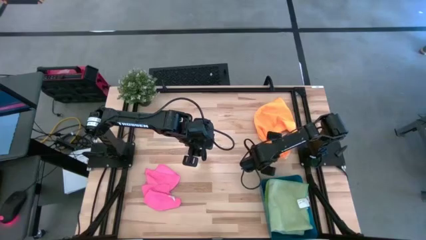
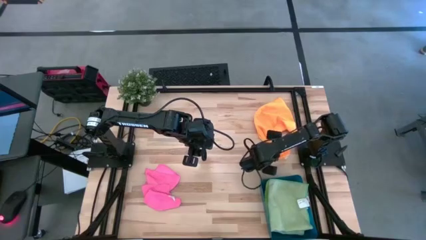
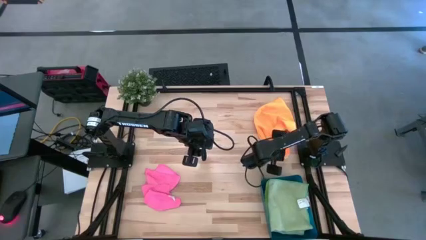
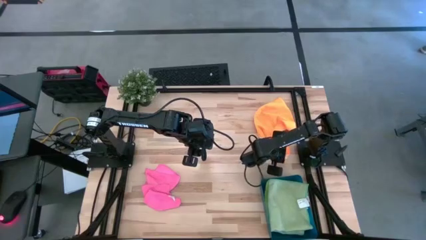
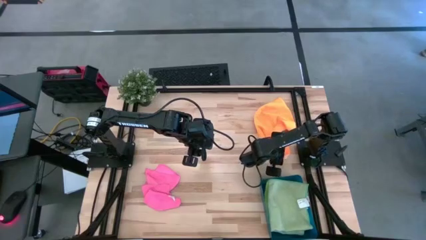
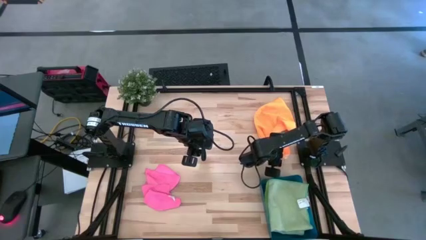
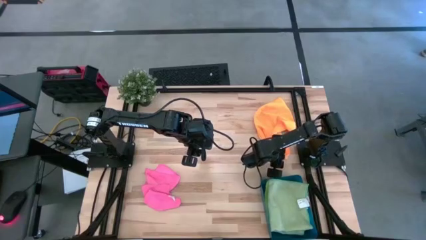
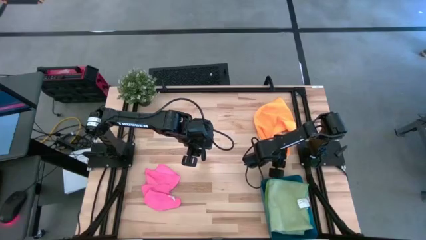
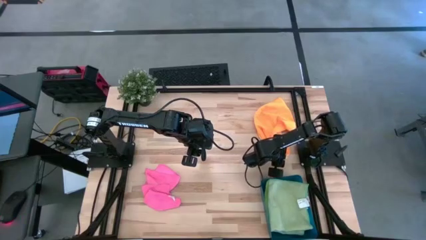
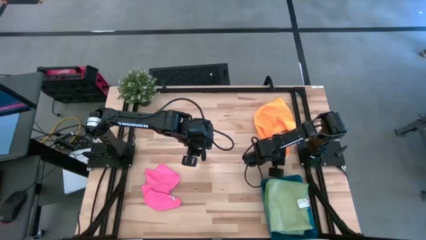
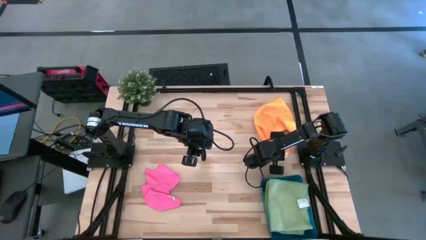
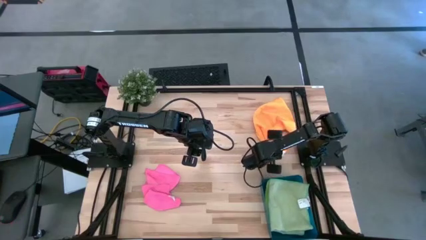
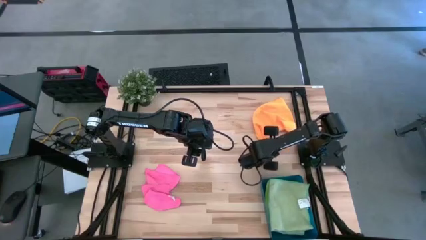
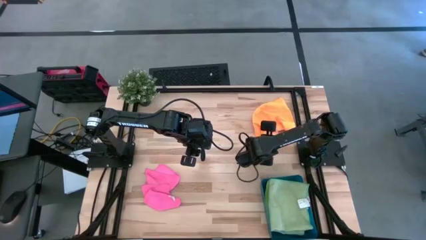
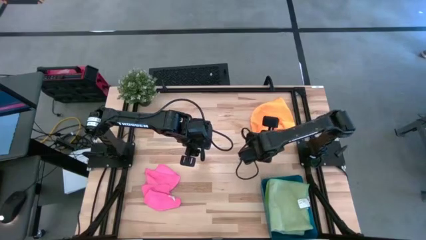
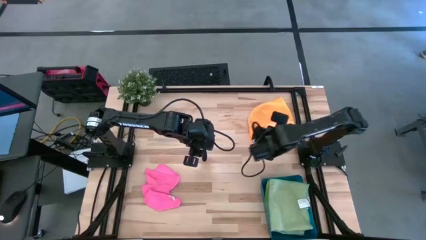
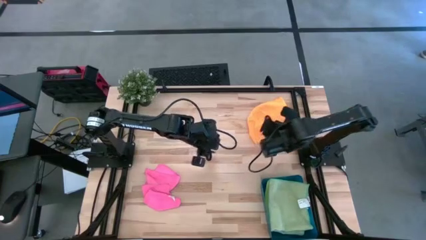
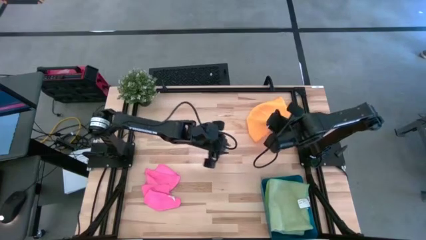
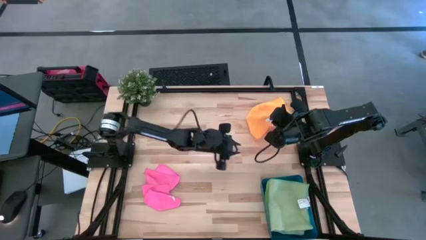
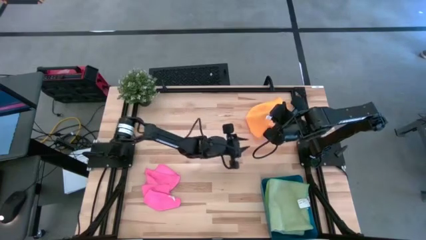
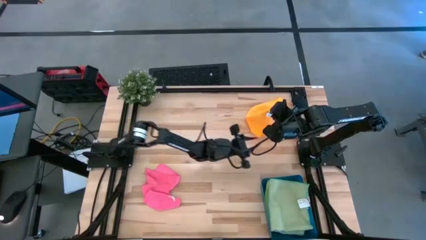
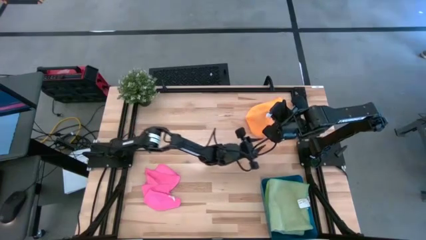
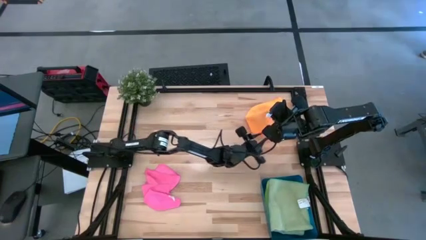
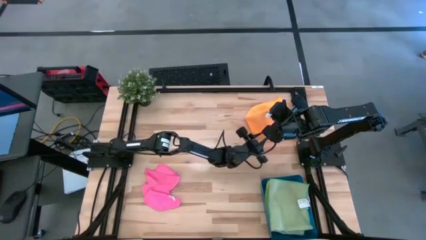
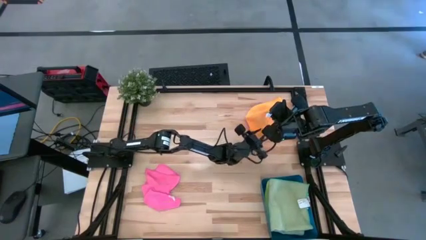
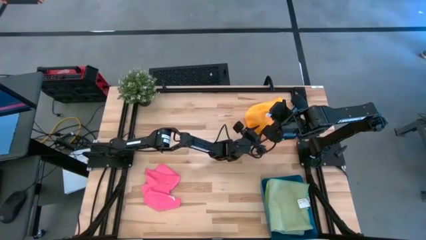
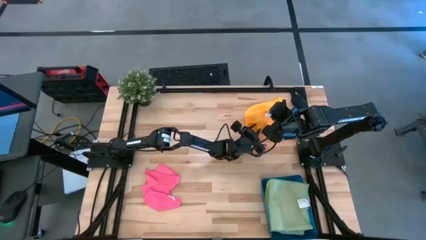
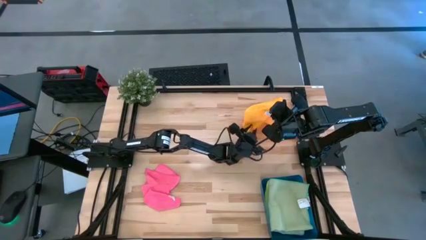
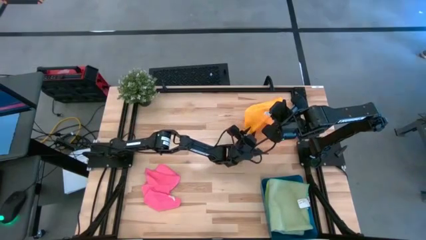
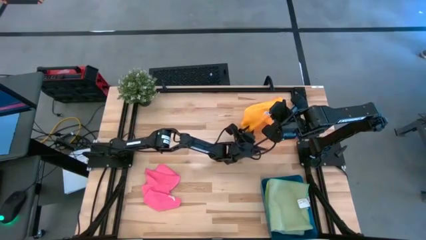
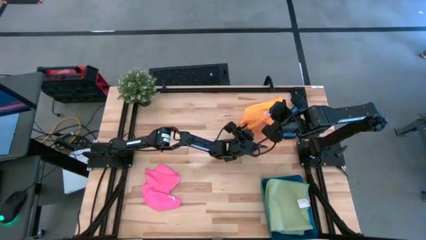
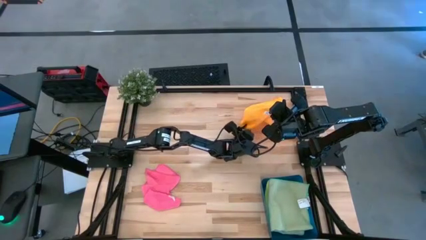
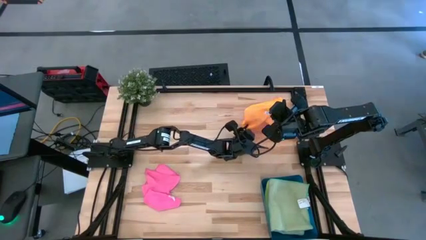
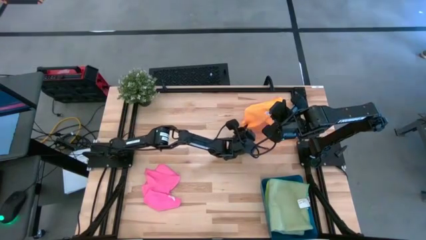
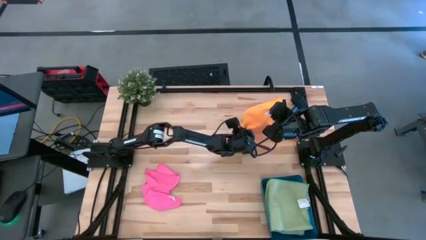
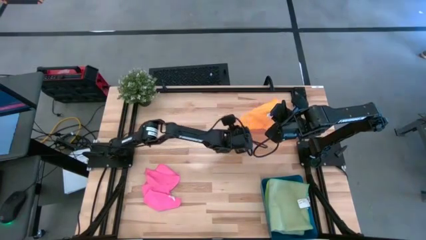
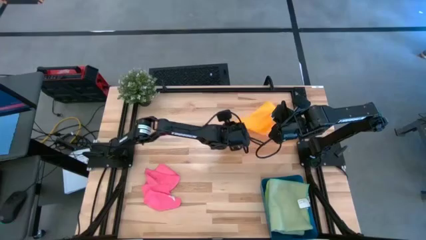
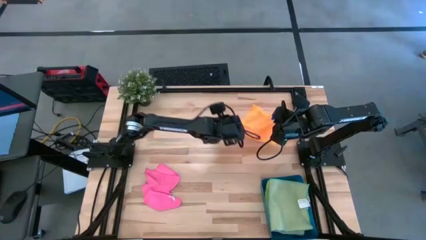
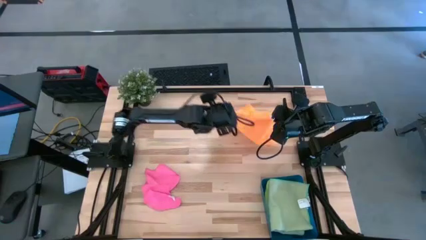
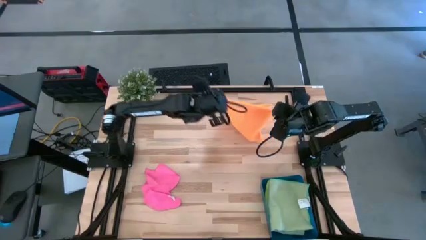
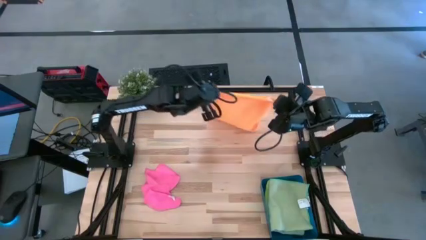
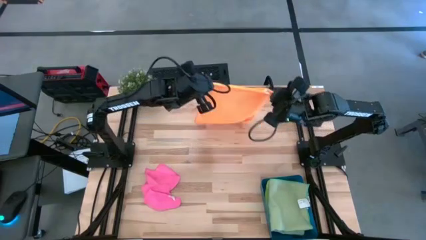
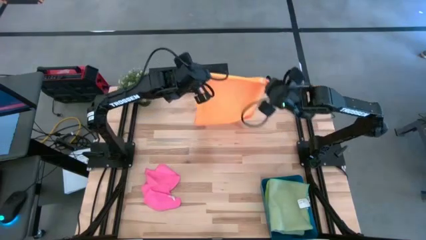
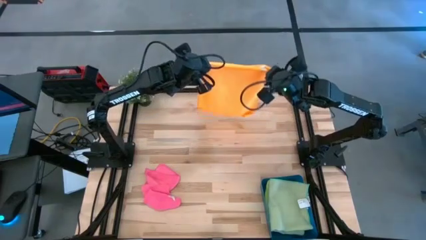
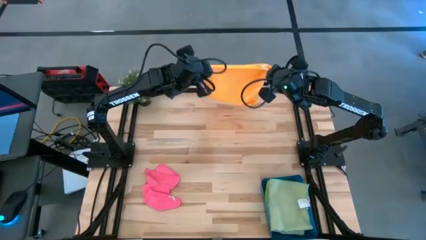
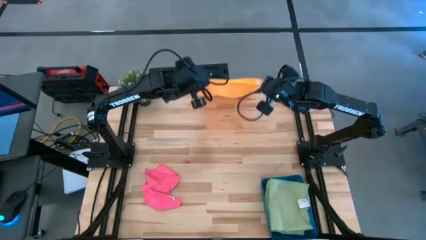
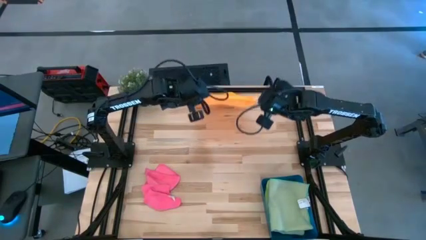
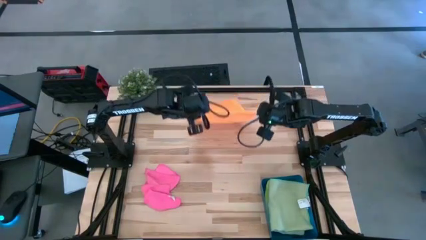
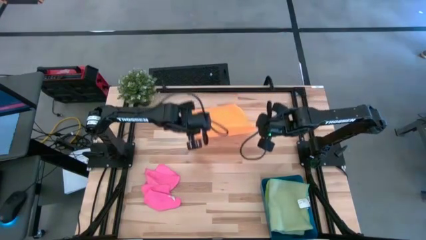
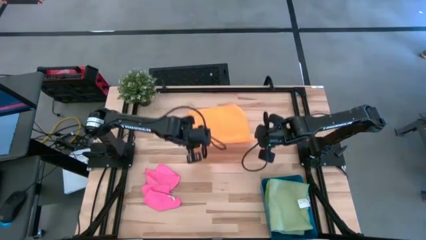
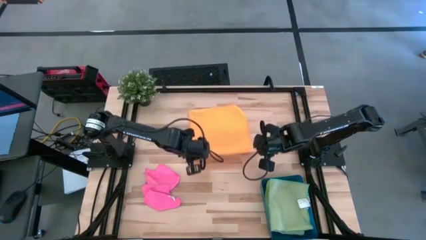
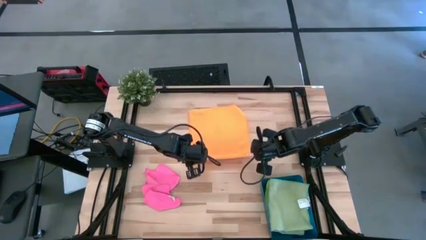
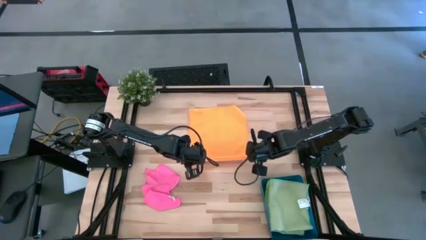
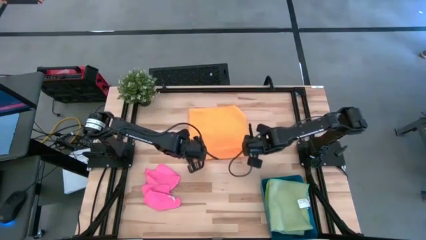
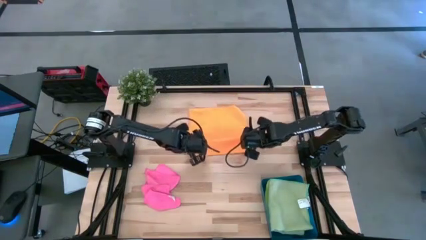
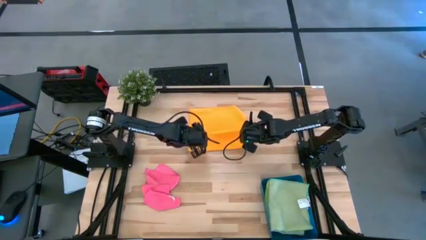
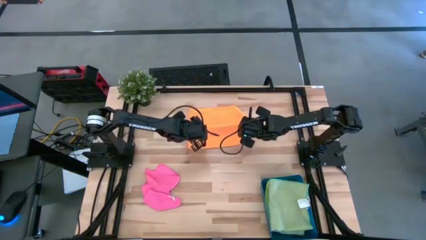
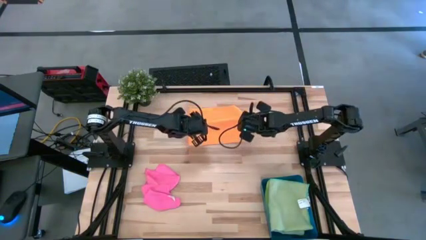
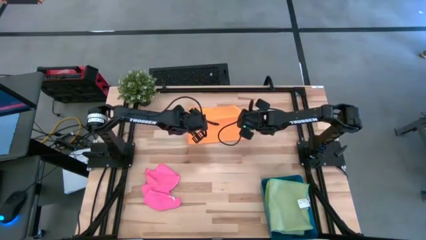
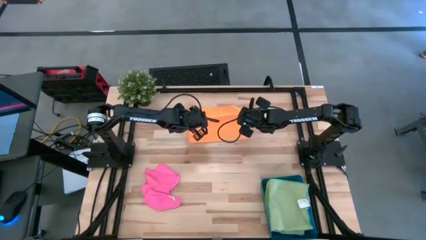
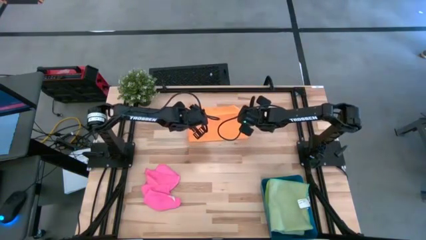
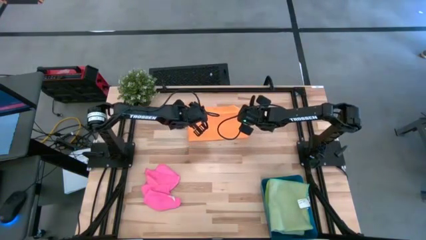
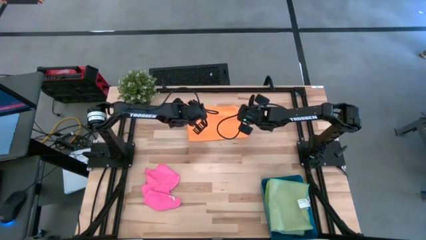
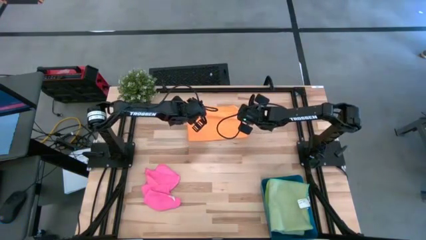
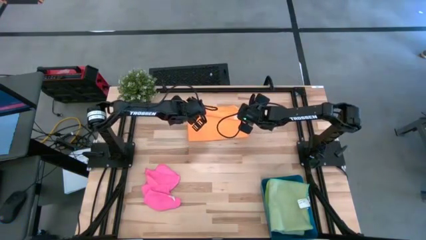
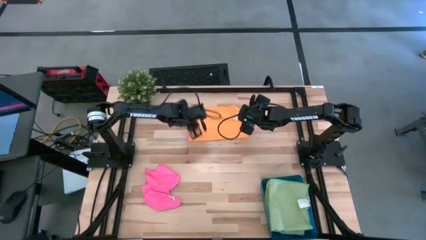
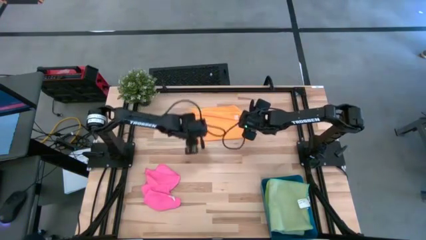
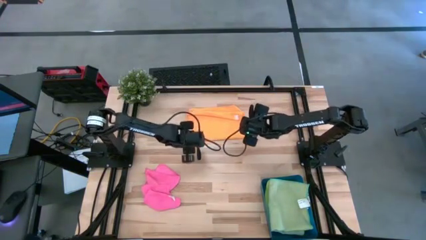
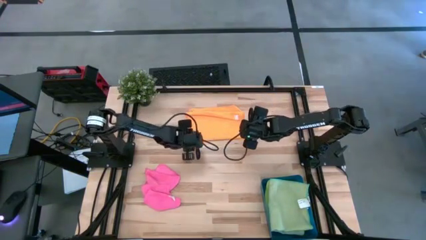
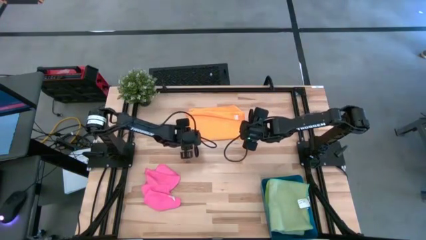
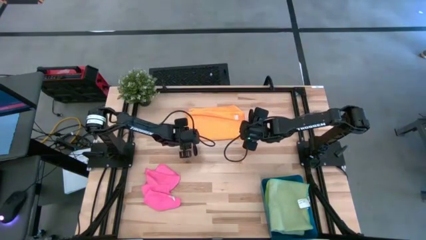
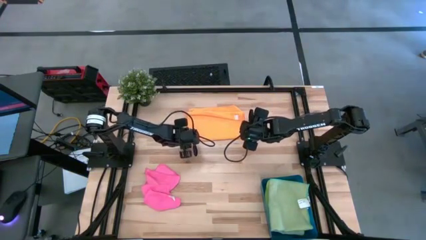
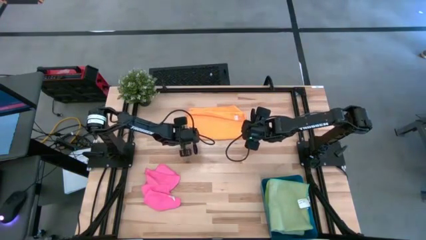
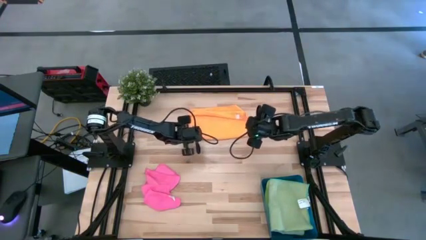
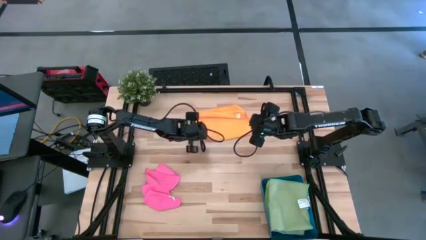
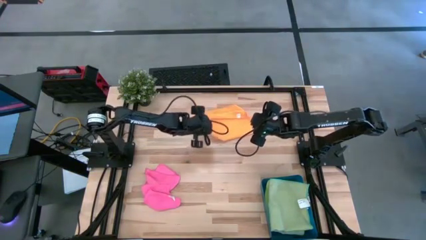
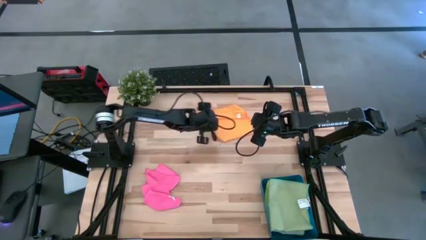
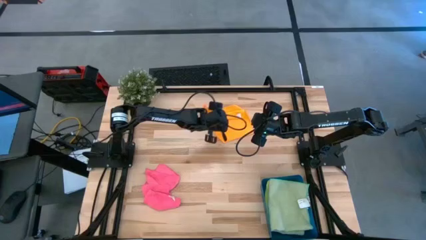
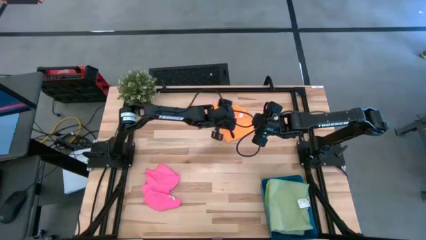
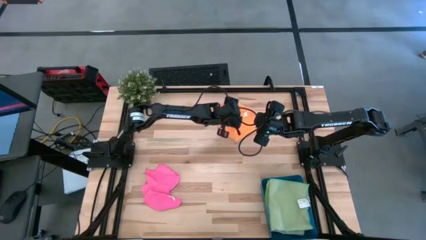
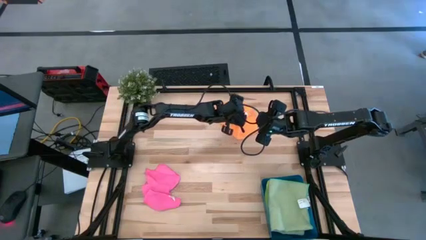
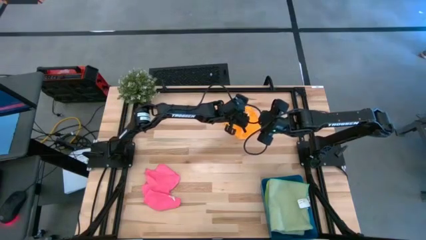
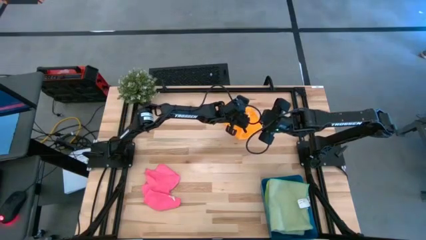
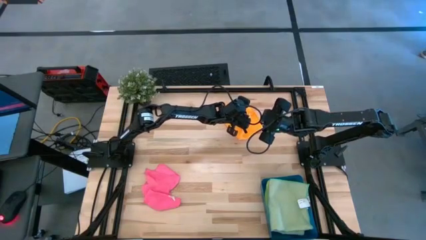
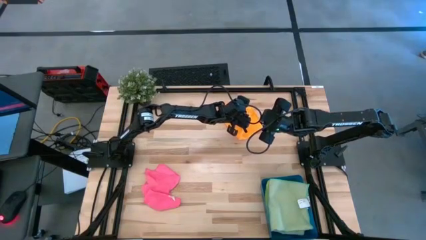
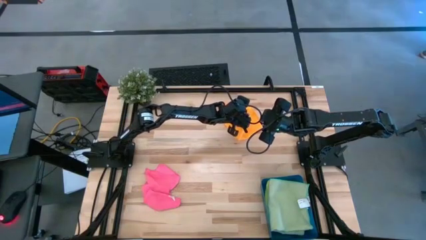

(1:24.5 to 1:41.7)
Task: Fold microfiber towels
Fold the orange microfiber towel
